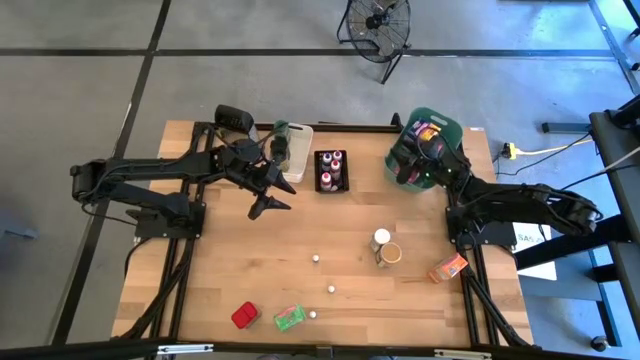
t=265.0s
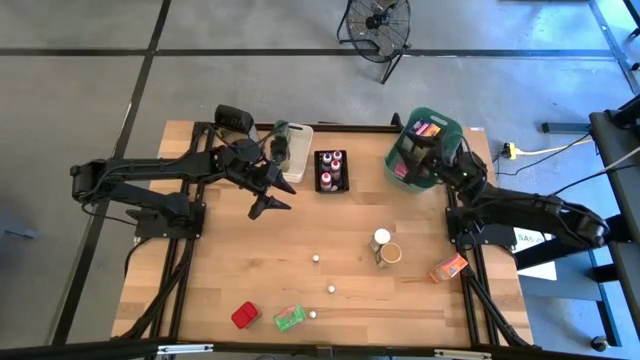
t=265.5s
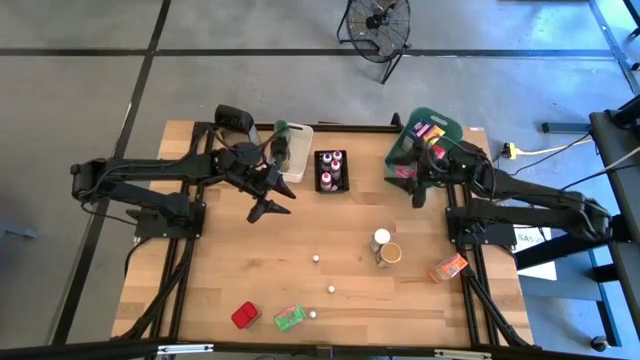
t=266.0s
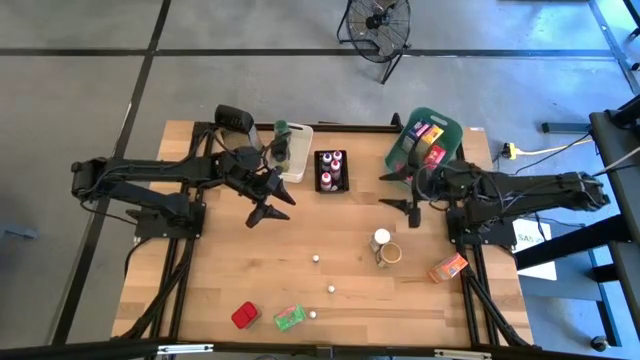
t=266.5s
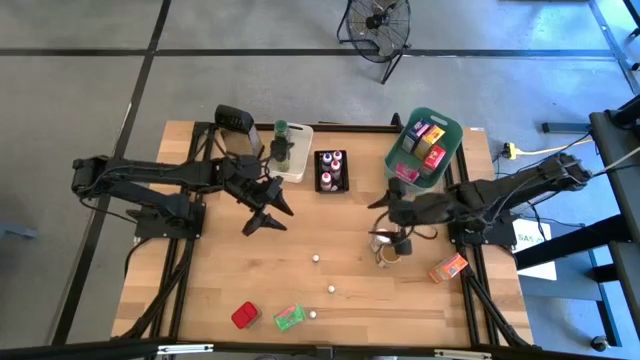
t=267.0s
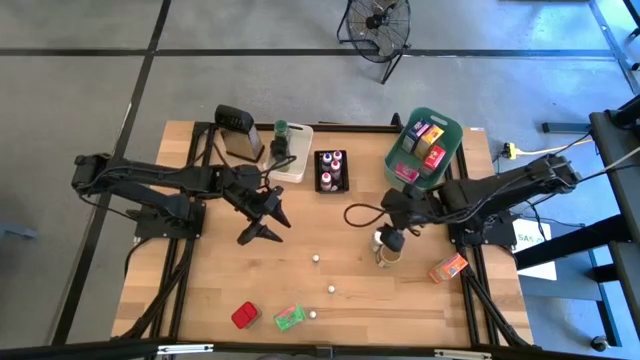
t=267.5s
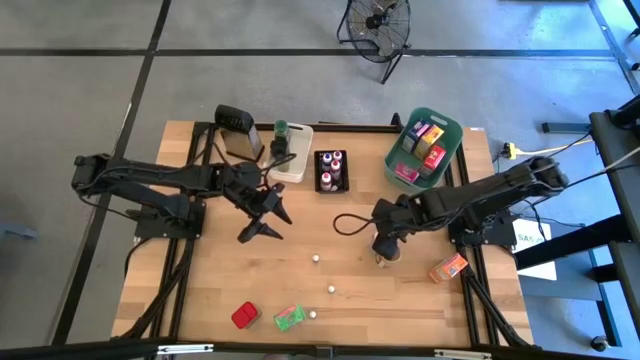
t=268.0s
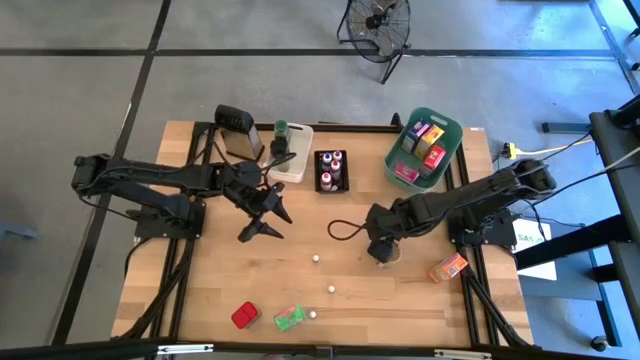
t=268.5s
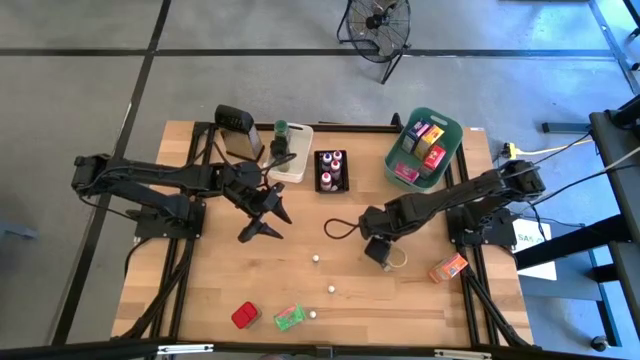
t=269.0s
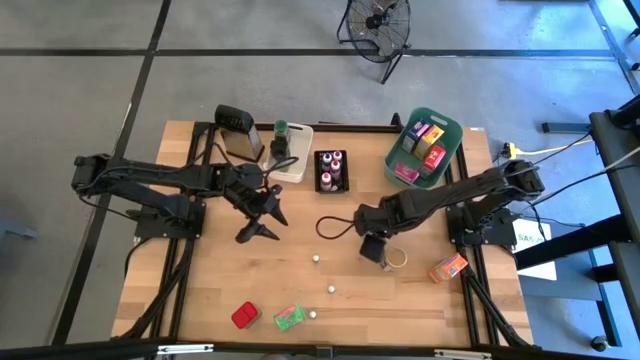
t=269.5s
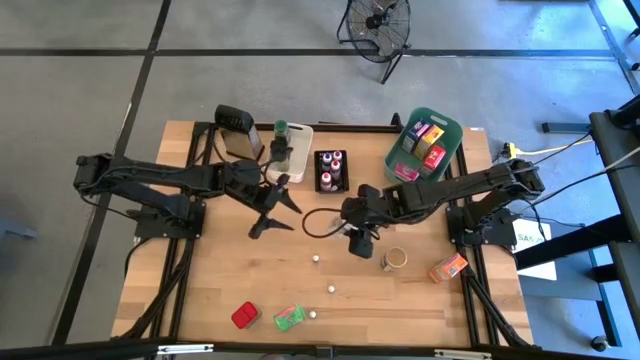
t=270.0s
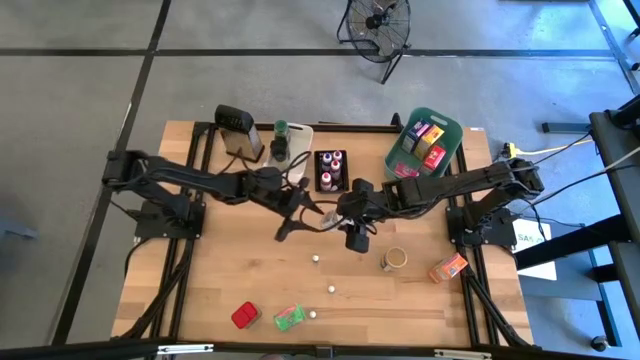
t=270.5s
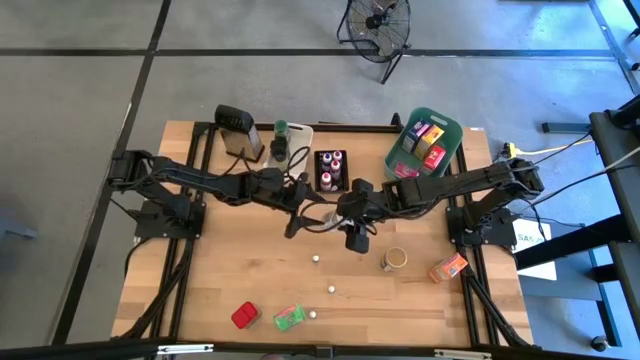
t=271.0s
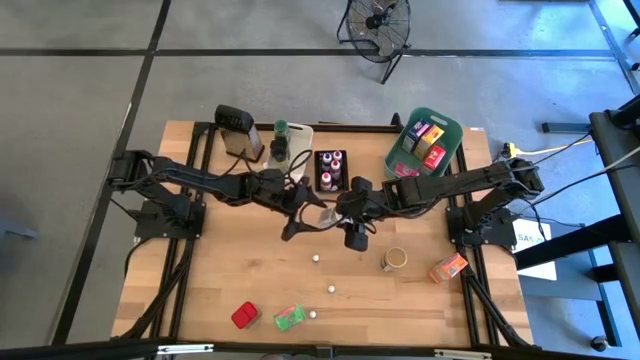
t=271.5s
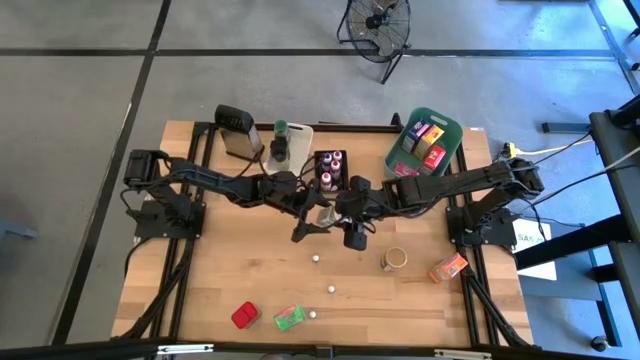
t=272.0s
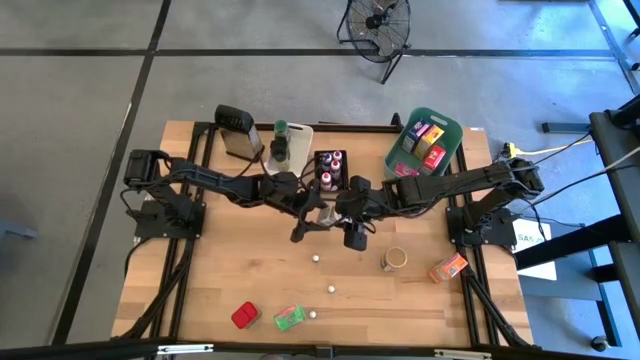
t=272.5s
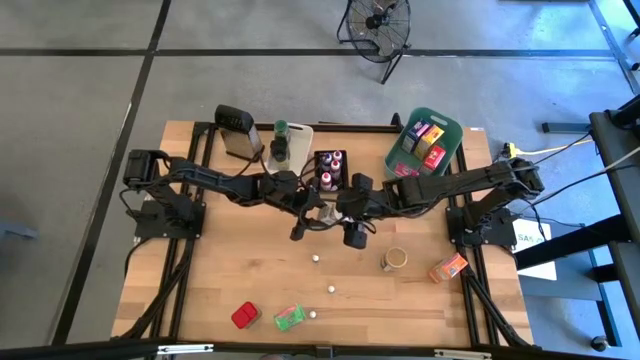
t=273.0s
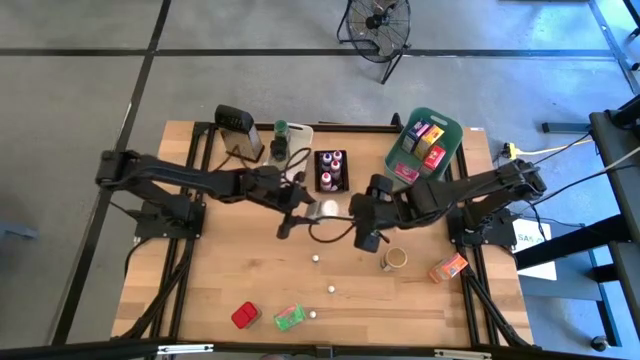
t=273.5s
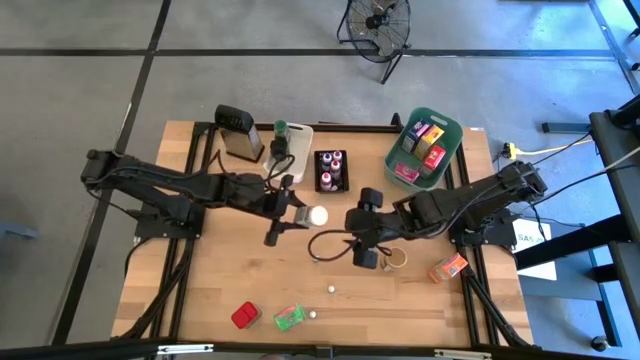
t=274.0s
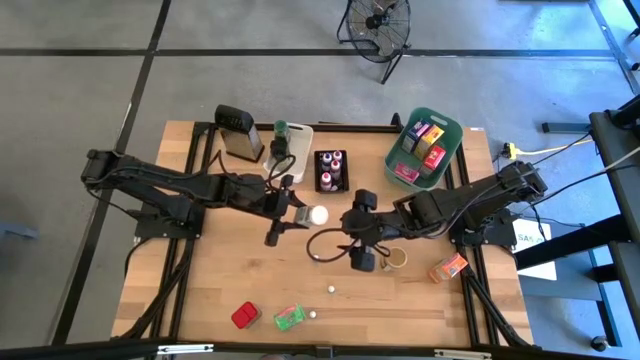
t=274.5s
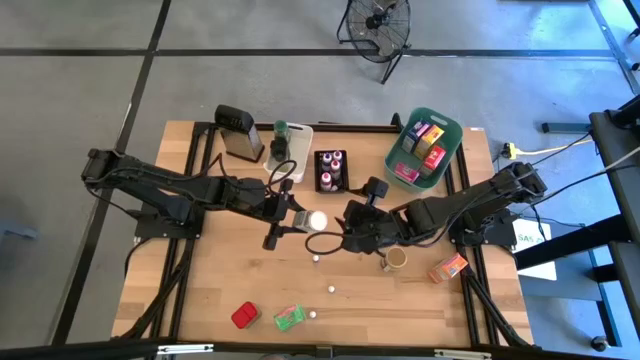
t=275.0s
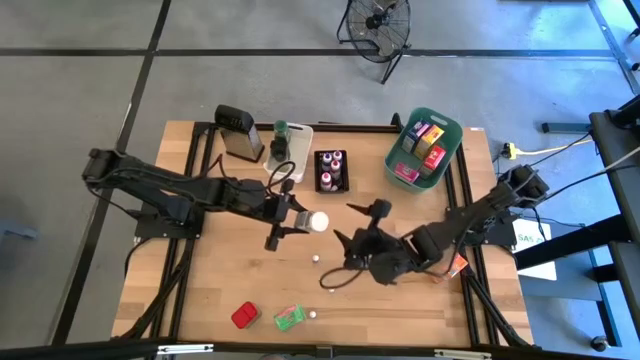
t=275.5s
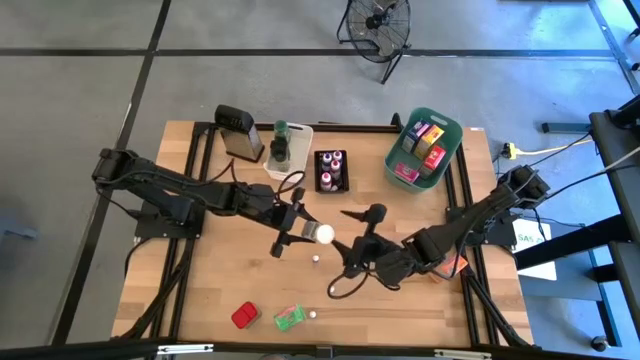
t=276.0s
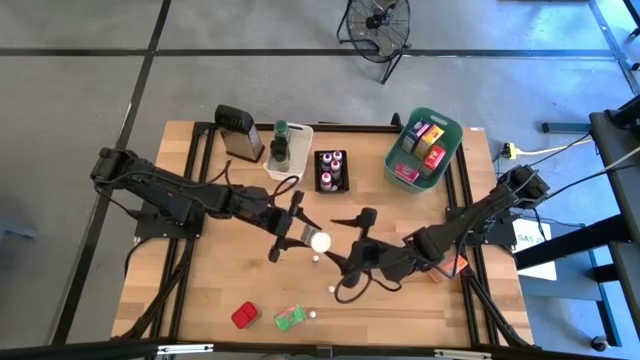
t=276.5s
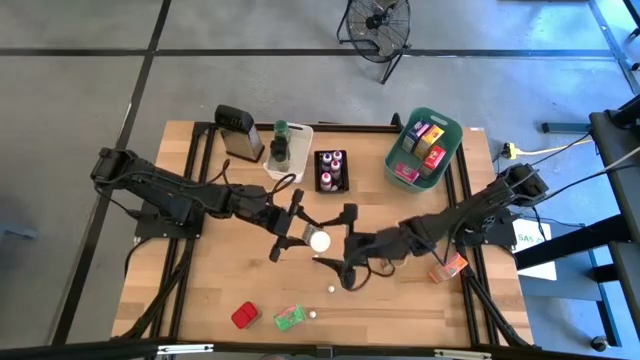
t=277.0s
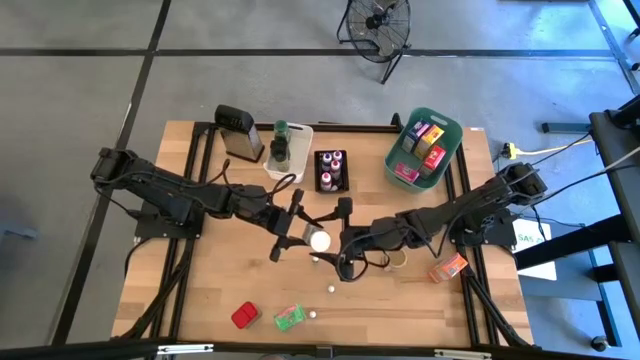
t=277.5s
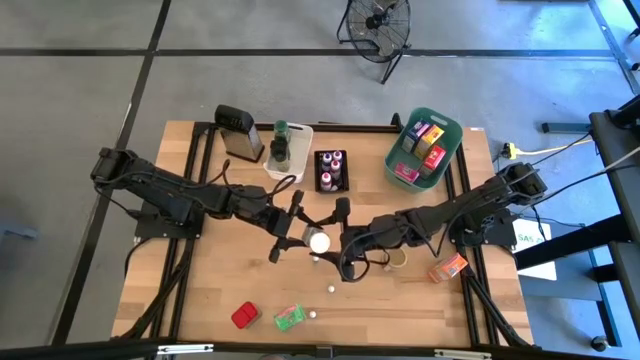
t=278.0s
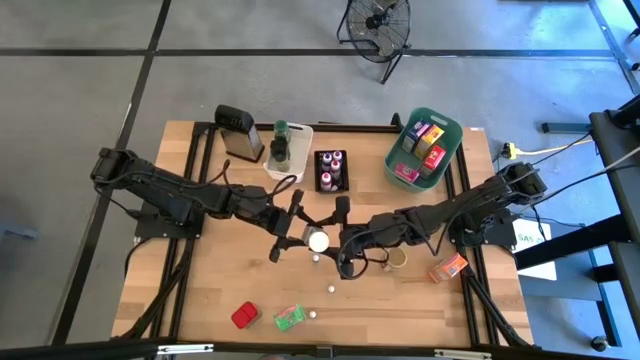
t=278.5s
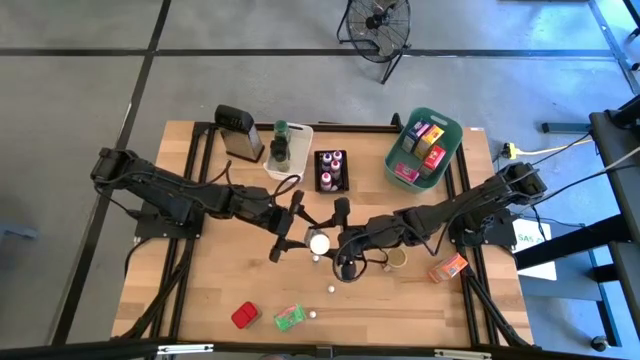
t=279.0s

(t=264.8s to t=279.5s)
Task: Pick & Place Kitchen Items
Put the white seasoning bottle into the white bin

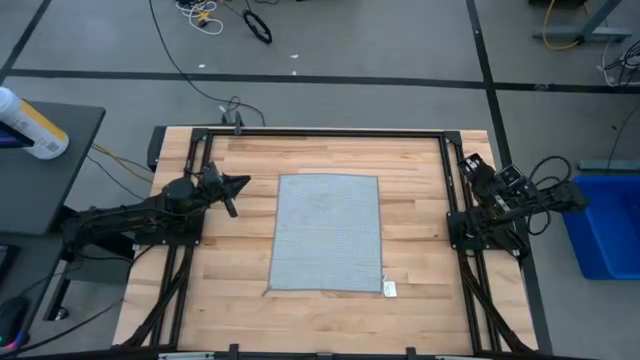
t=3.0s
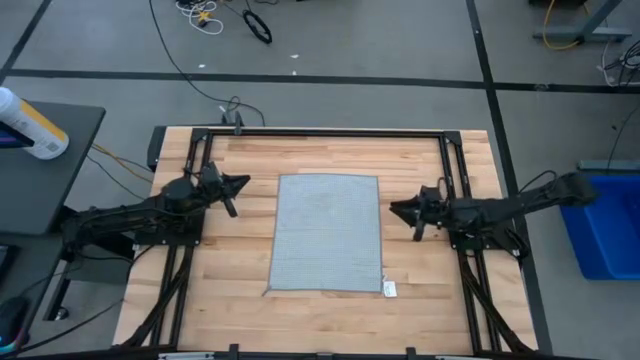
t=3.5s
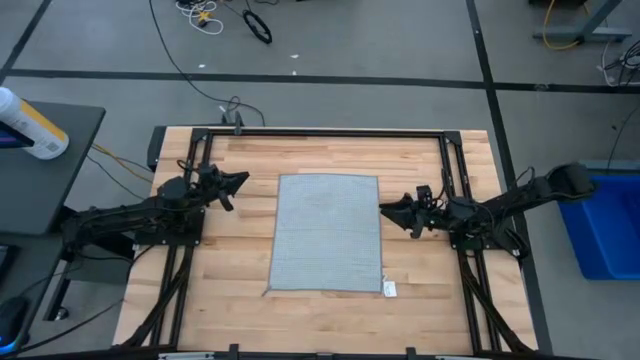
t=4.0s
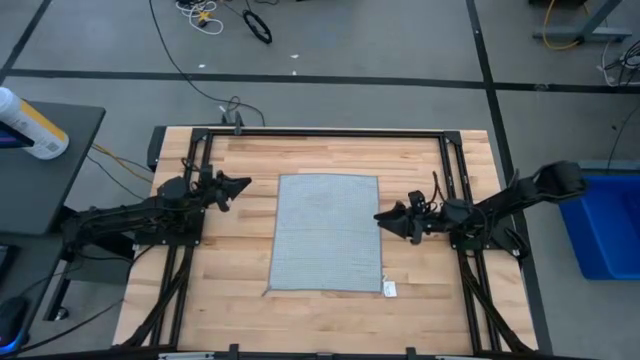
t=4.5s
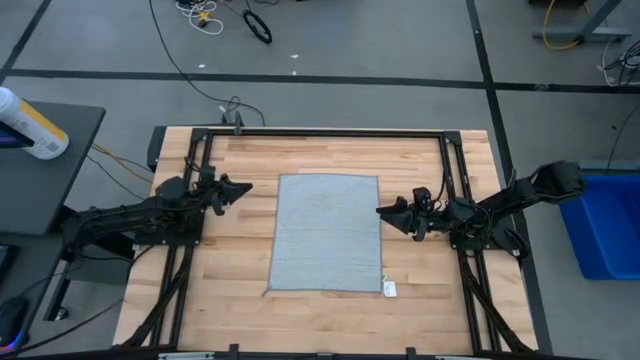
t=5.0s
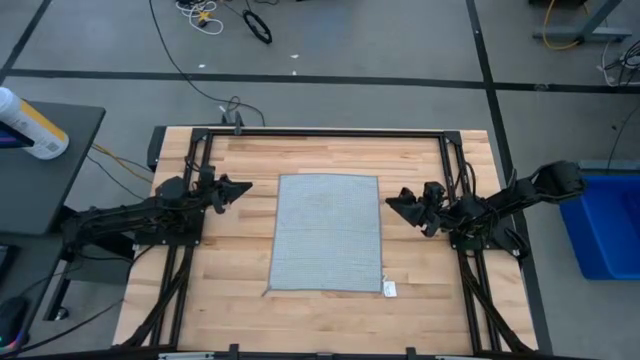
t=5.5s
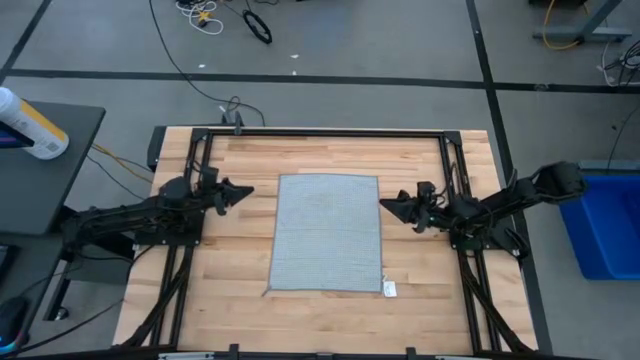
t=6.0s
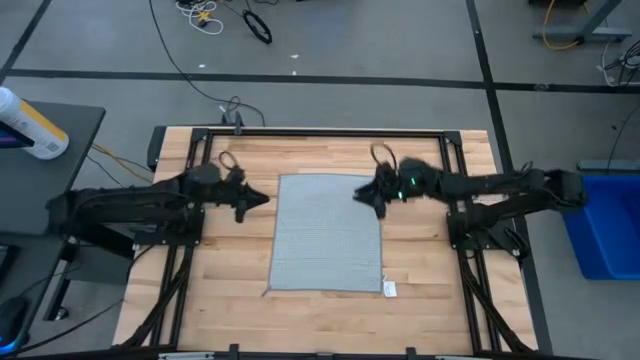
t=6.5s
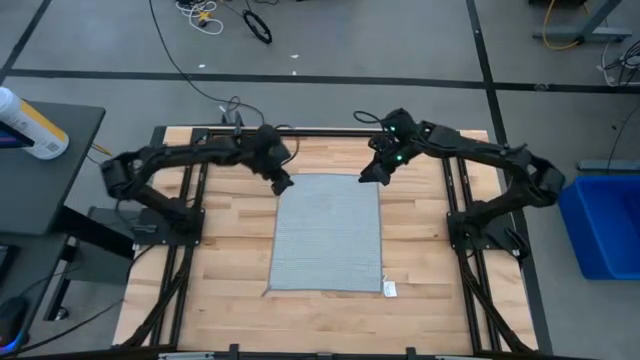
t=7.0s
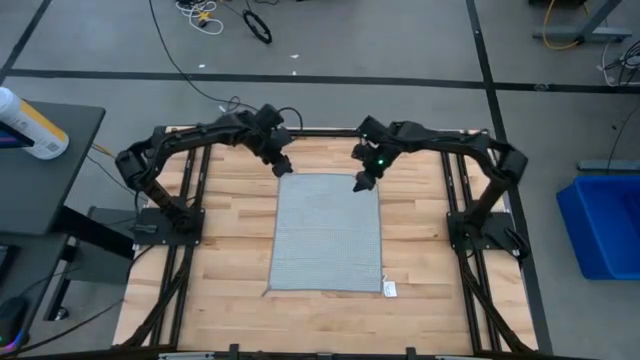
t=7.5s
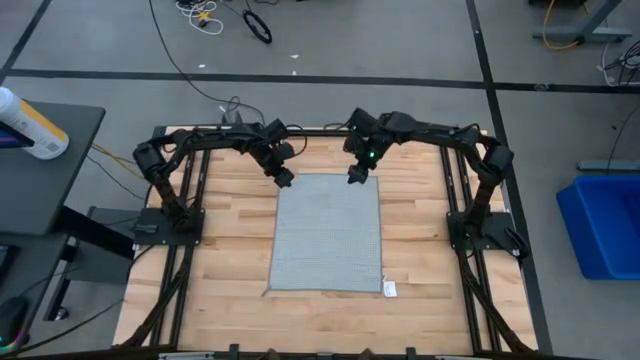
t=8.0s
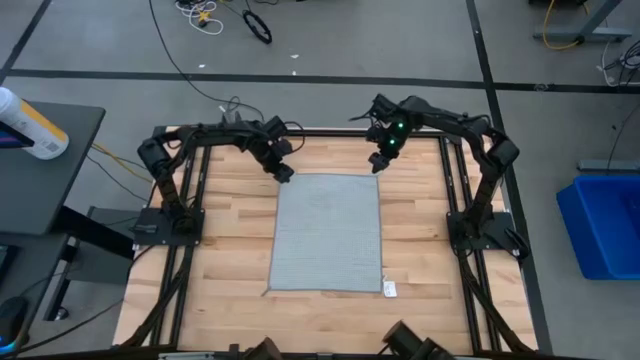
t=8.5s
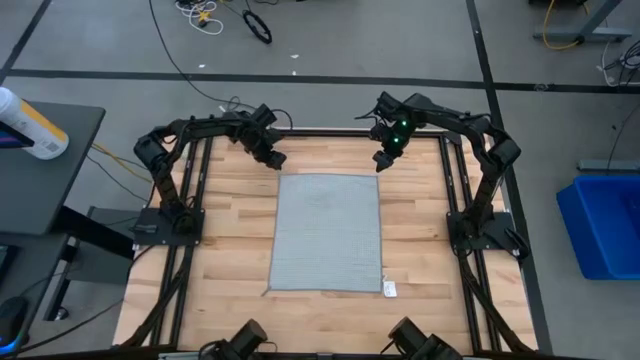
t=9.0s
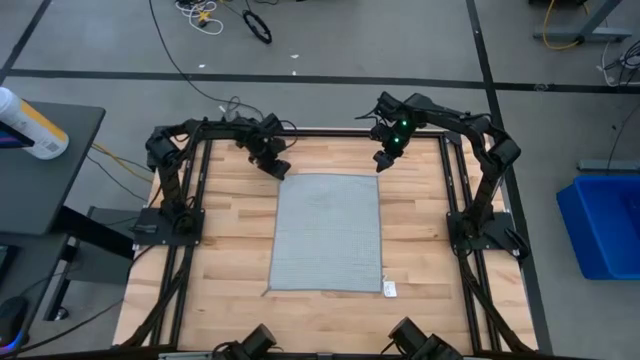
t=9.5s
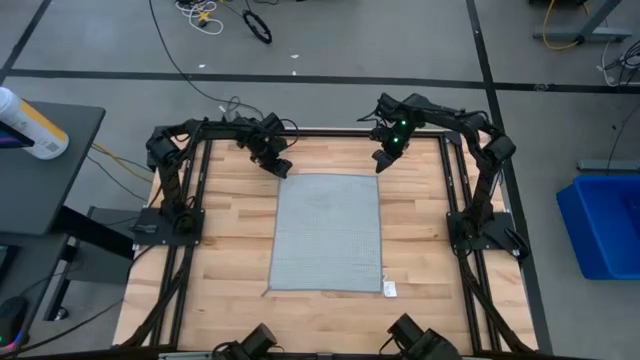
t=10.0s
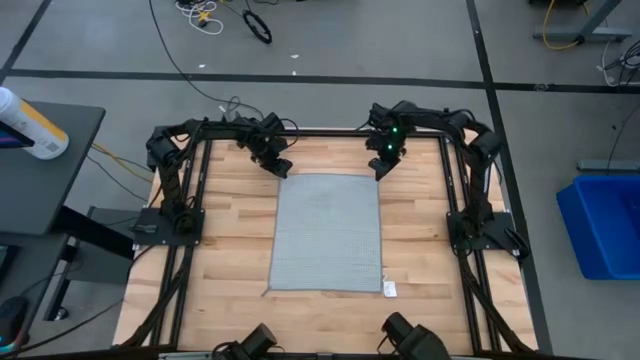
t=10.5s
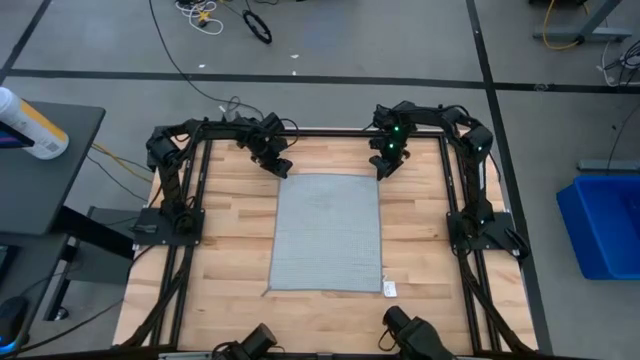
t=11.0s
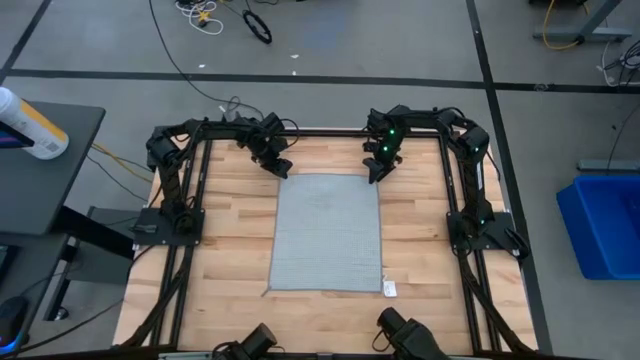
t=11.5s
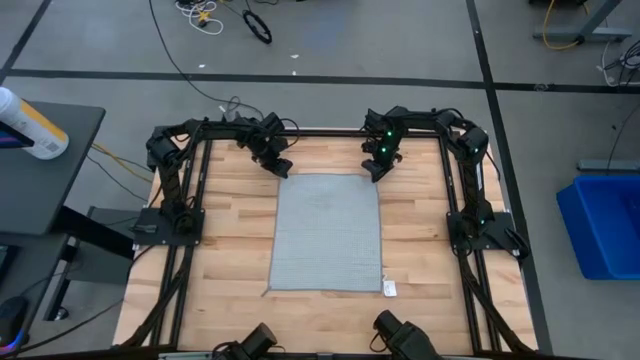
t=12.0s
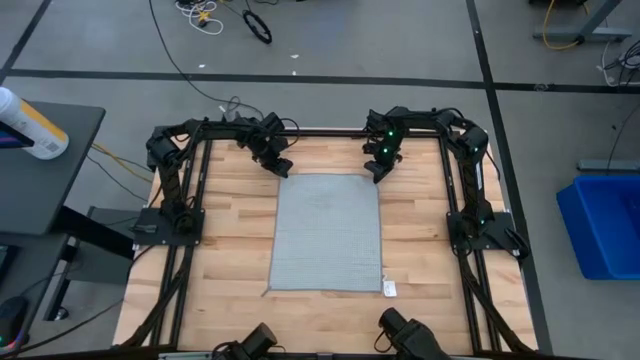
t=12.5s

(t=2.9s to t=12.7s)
Task: Fold microfiber towels
Fold the gray microfiber towel
